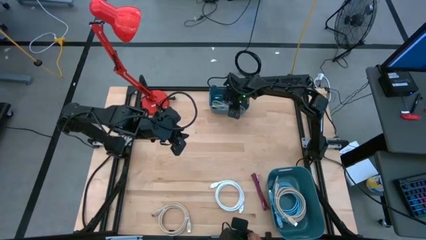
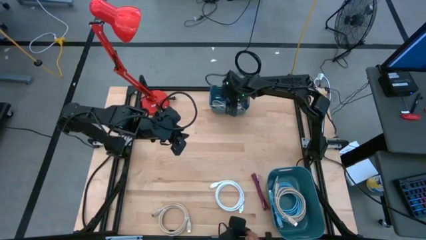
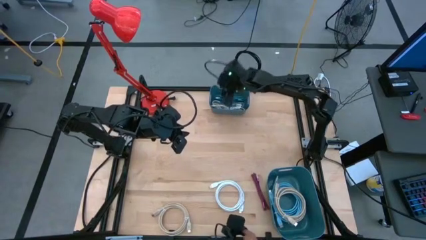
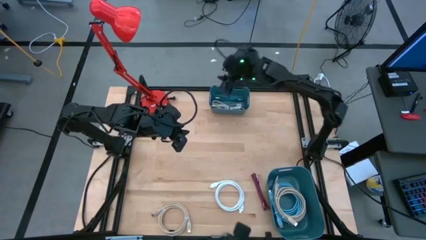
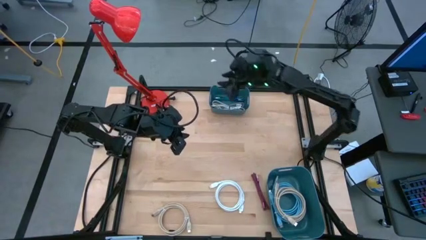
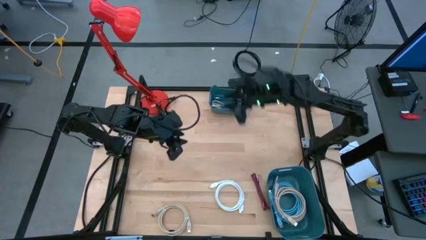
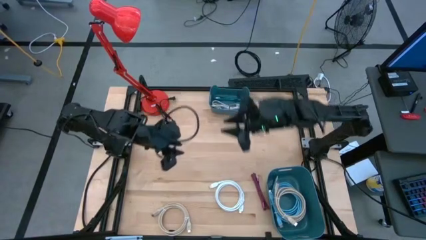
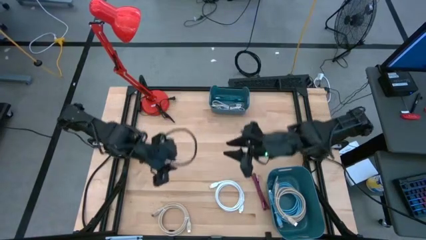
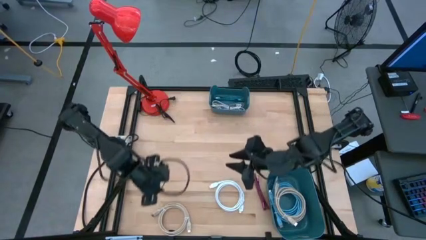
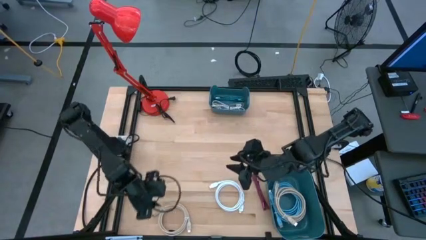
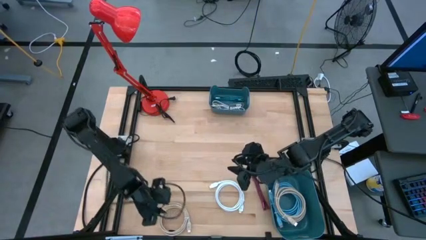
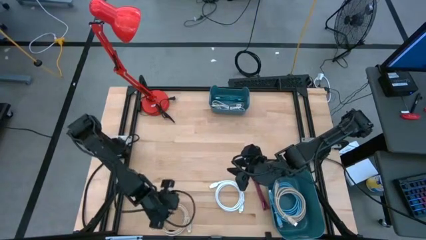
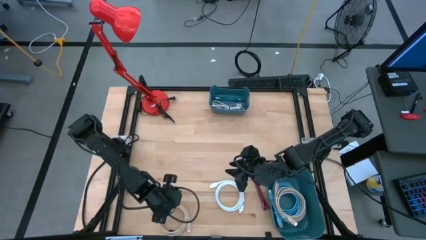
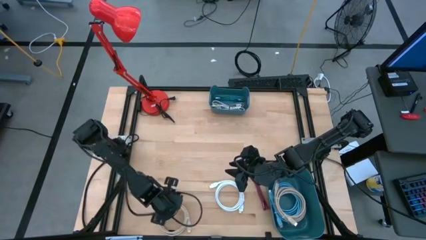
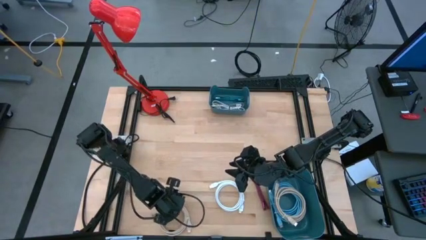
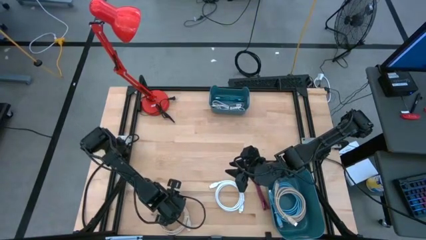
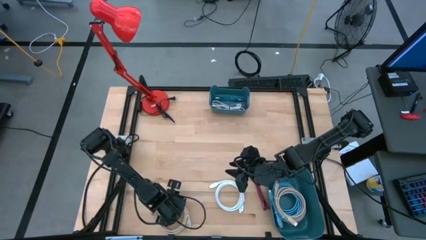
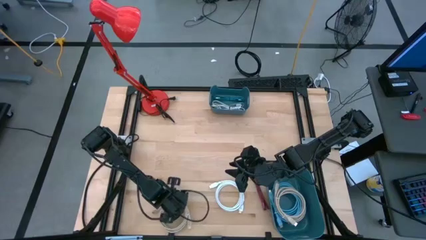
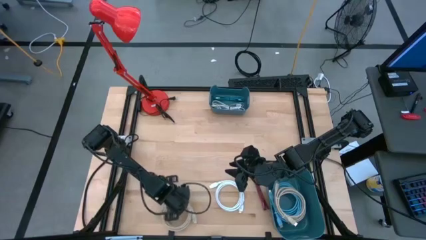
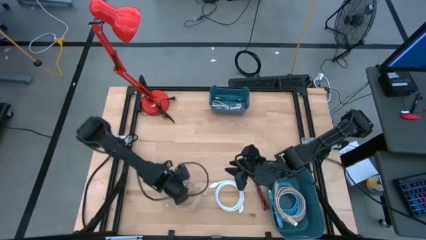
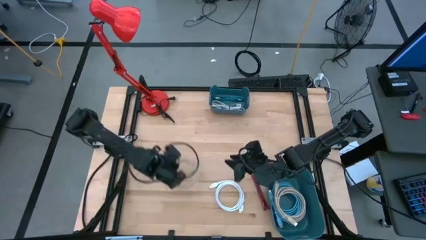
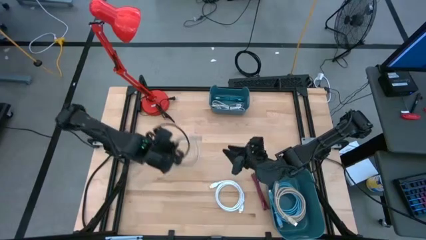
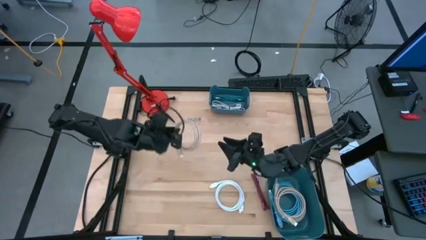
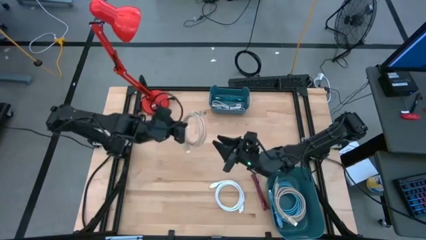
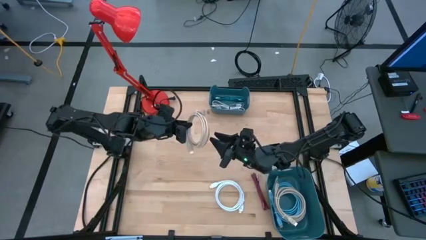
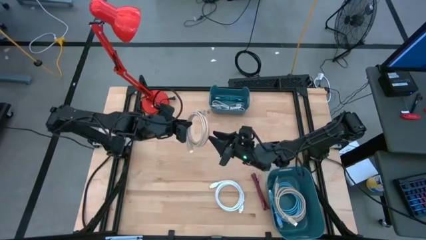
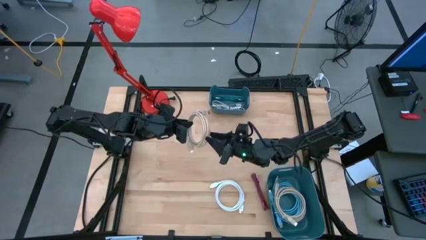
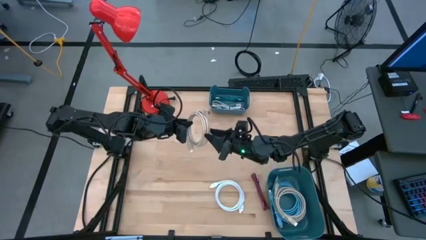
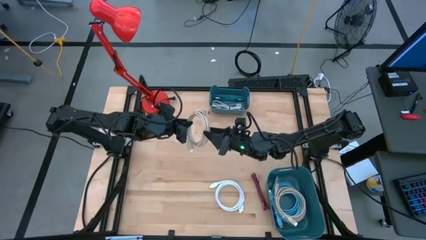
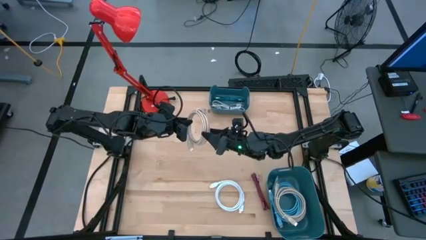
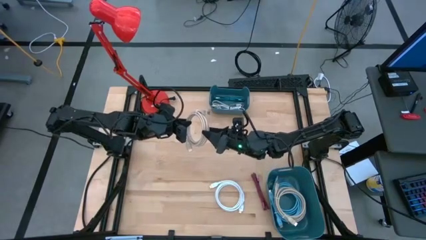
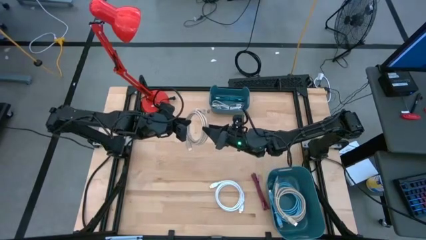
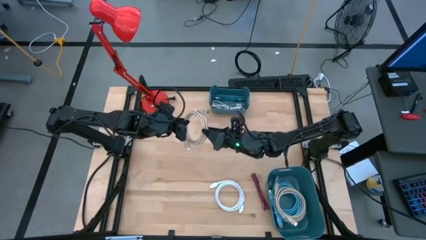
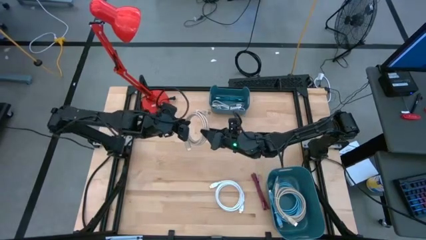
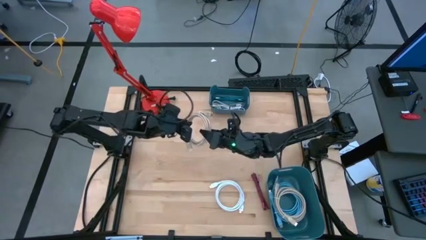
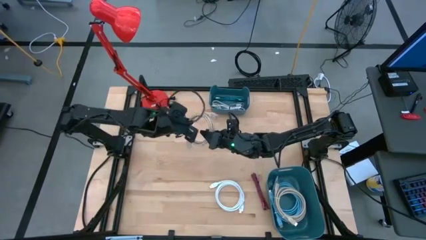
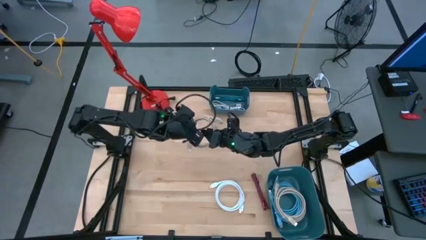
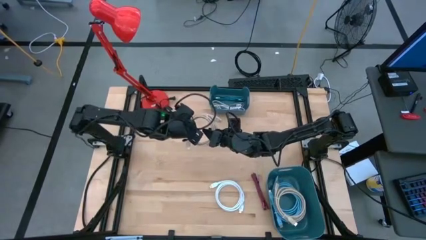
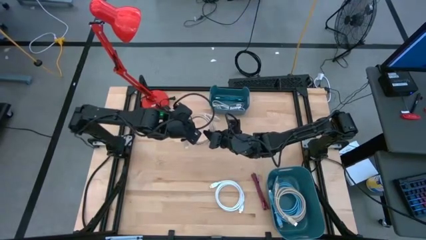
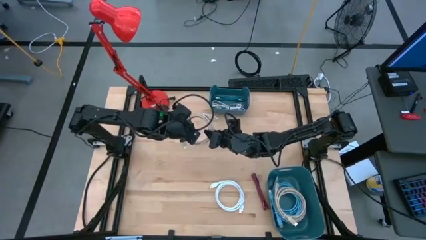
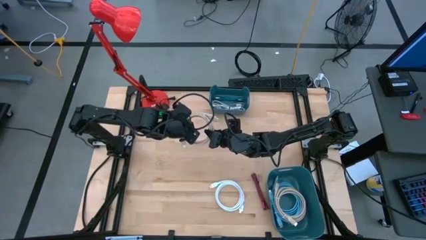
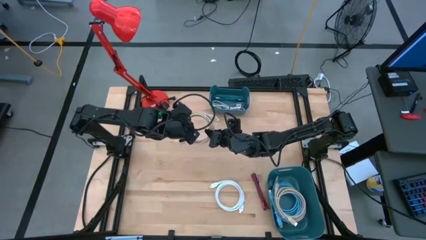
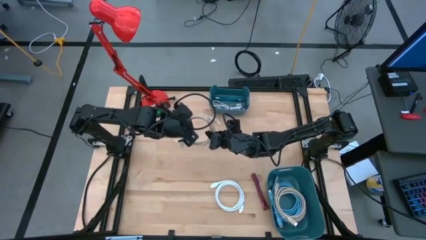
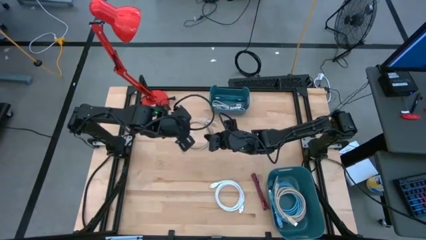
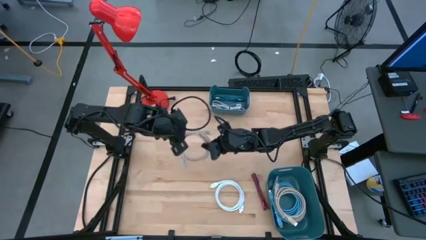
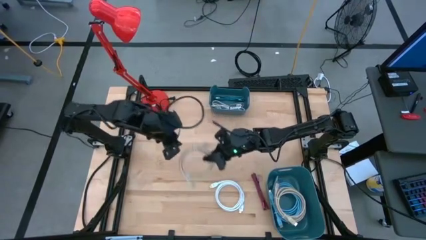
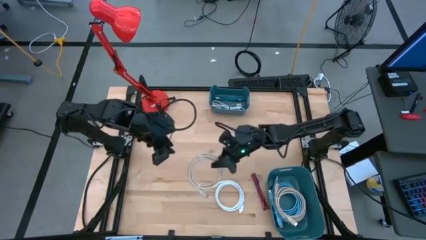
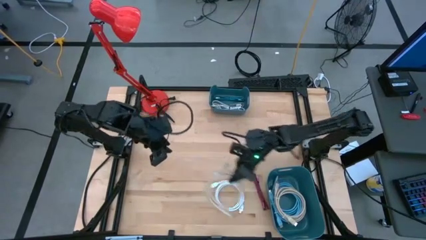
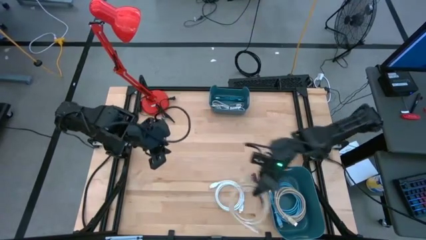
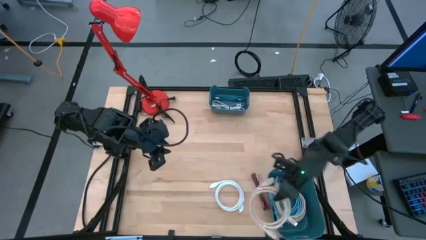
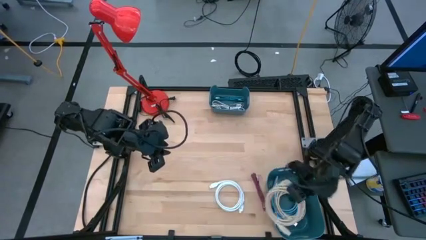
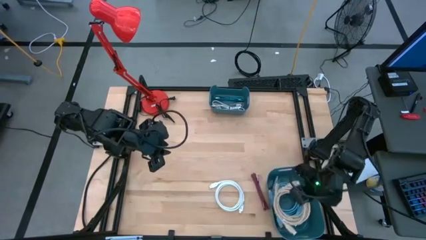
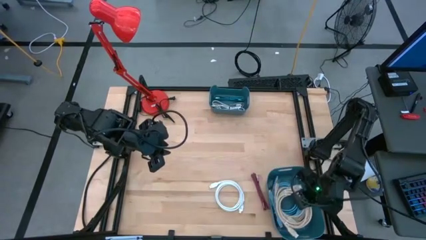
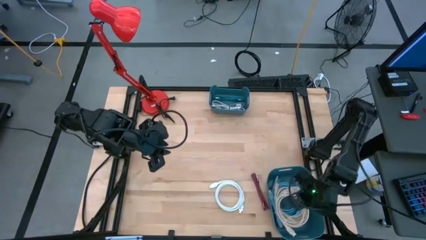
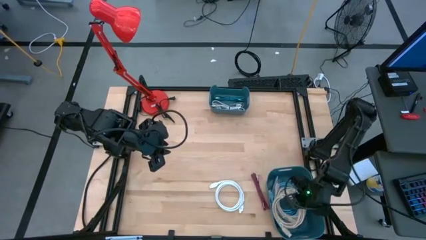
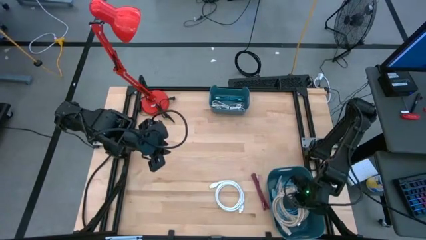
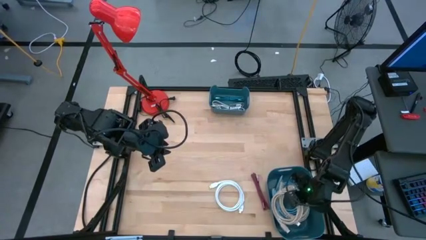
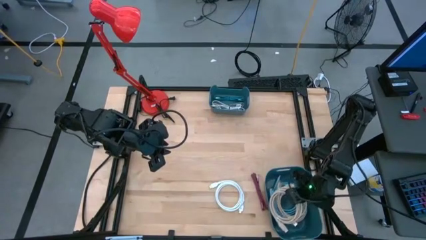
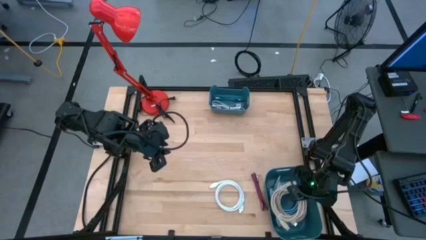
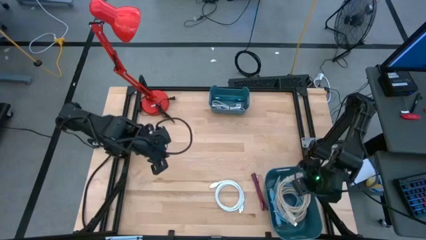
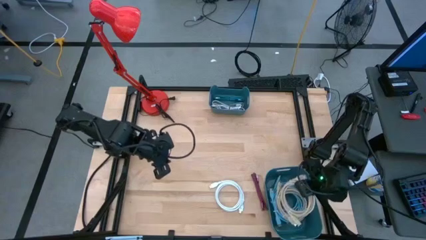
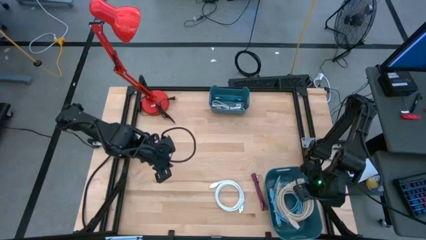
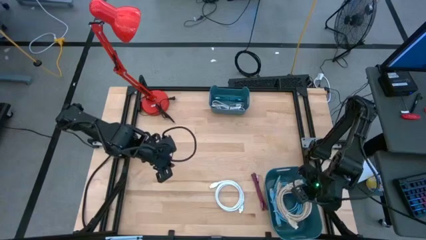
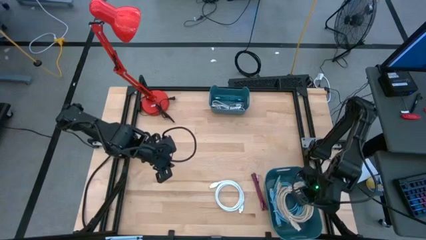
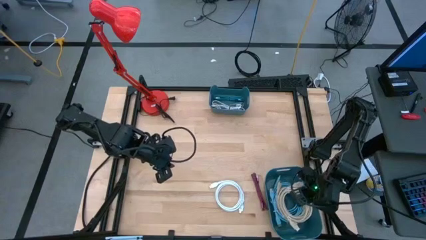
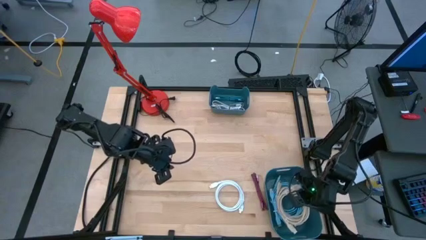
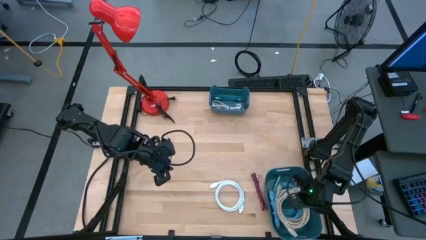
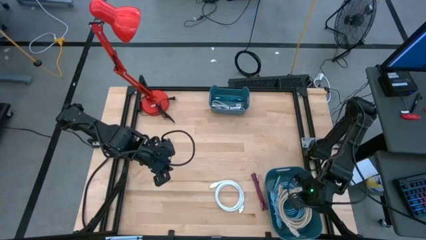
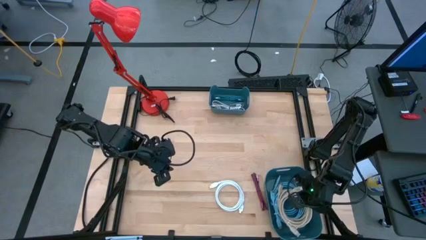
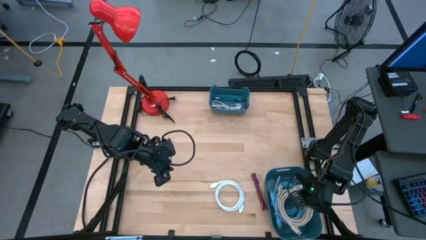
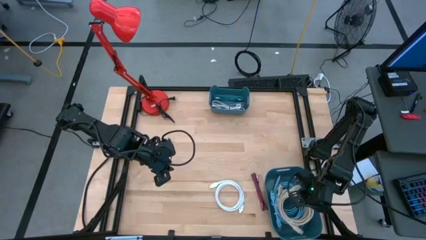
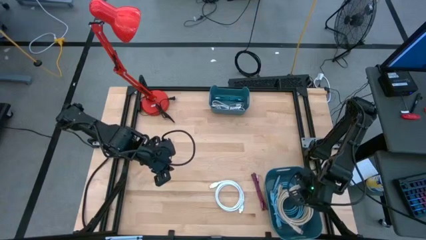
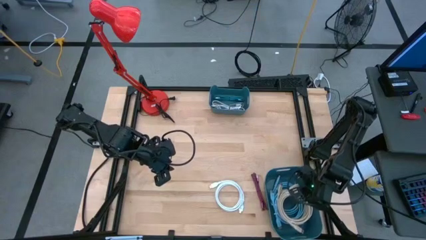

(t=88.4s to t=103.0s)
Task: Pick & Place USB Port
Put the light brown HDMI cable into the bottom blue bin

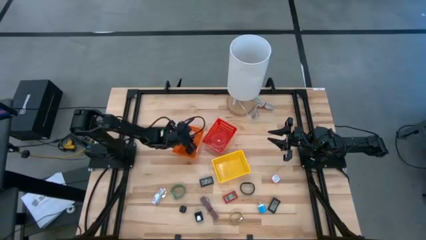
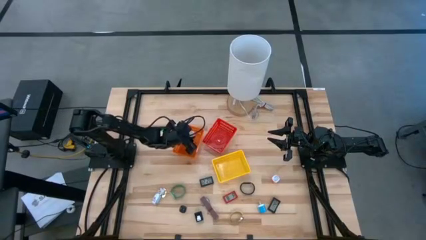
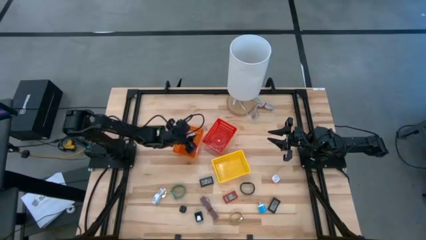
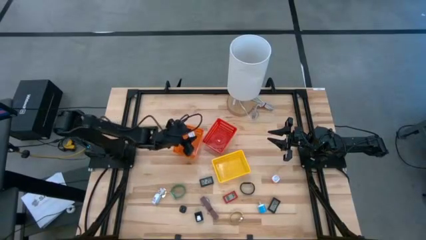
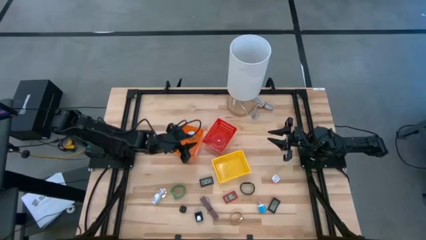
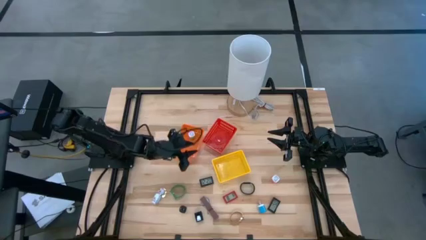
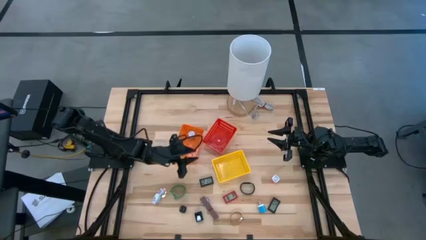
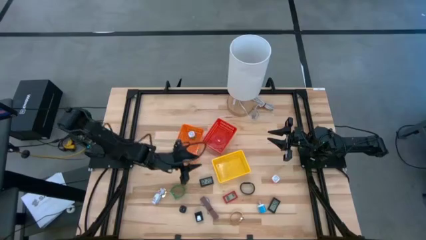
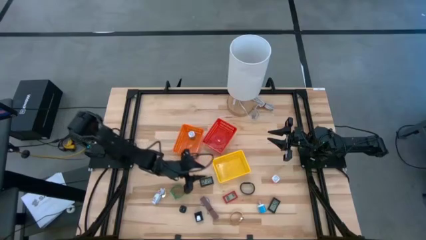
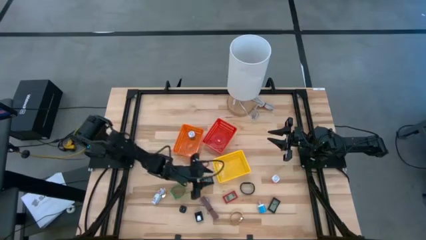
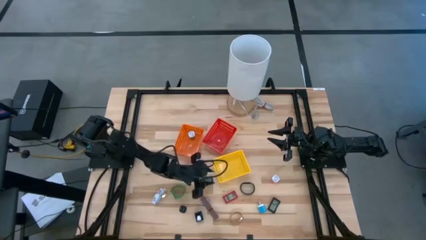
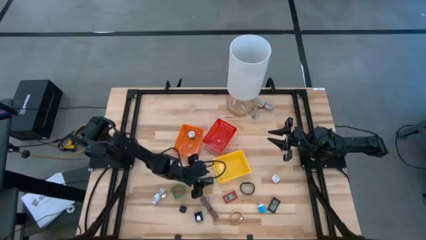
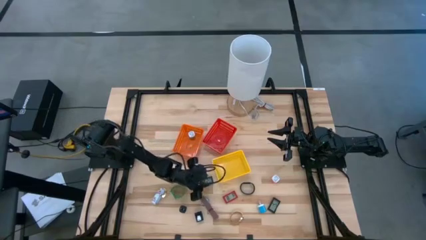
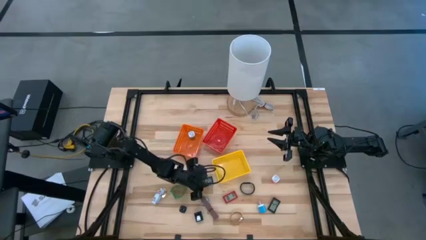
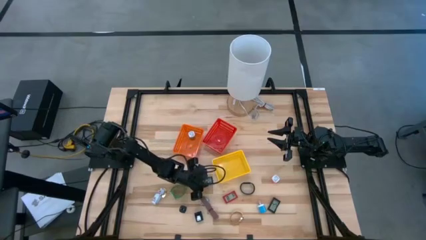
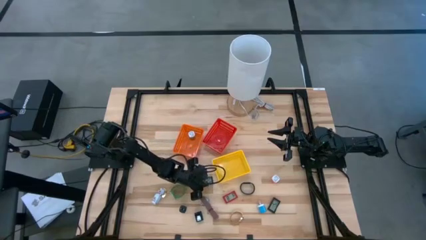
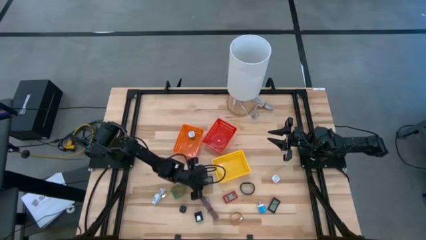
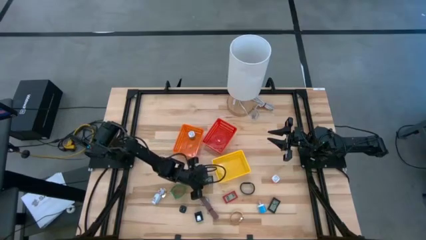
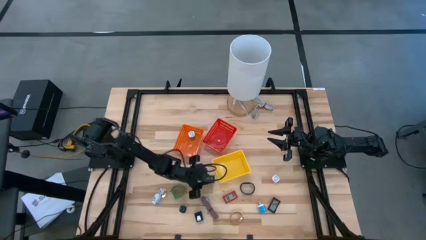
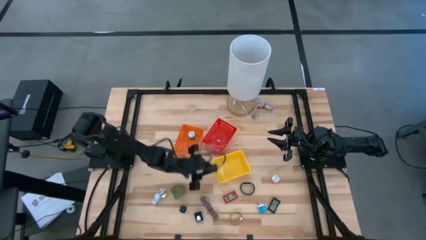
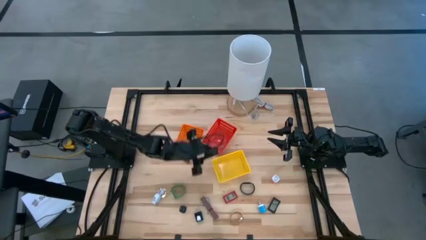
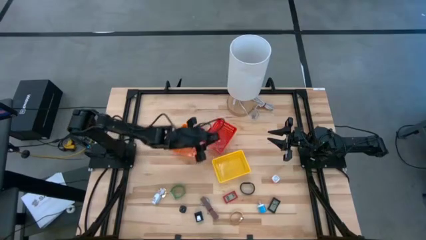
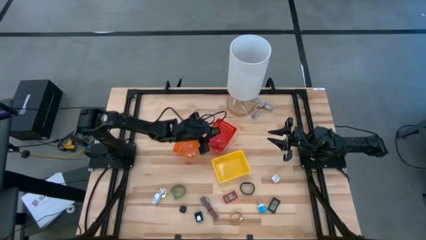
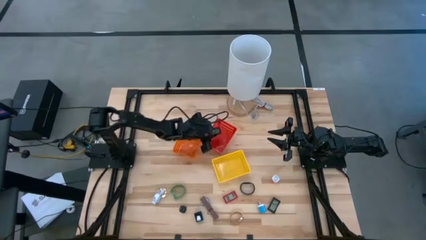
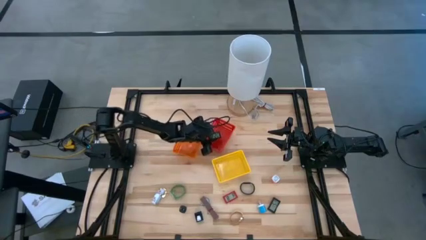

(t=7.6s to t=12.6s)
Task: Pick & Place Office items
Put the top black digital clock into the red bin
